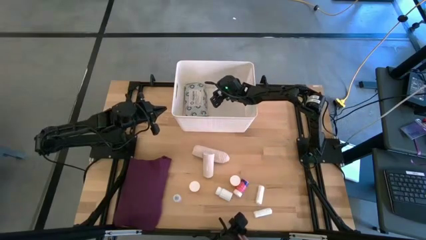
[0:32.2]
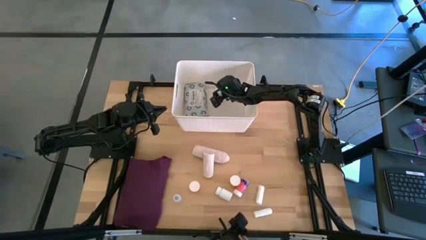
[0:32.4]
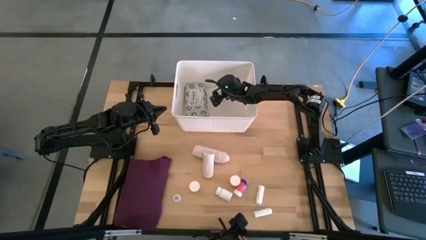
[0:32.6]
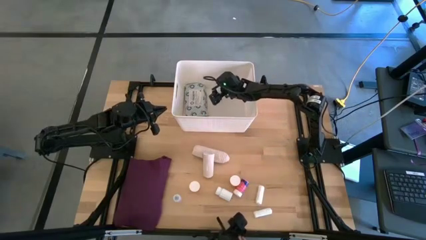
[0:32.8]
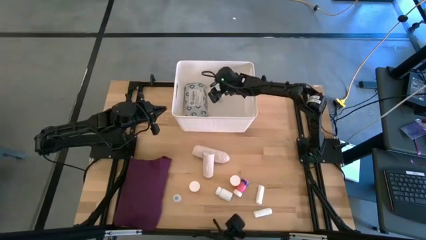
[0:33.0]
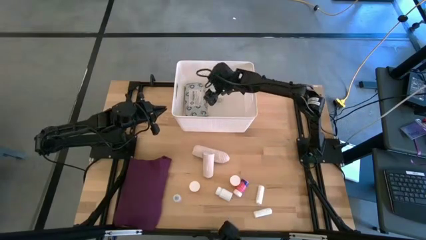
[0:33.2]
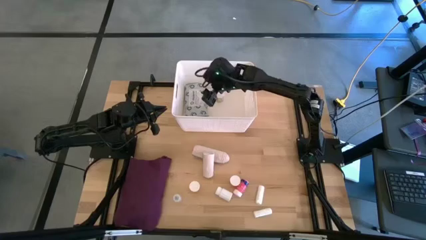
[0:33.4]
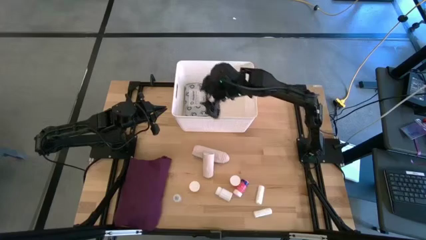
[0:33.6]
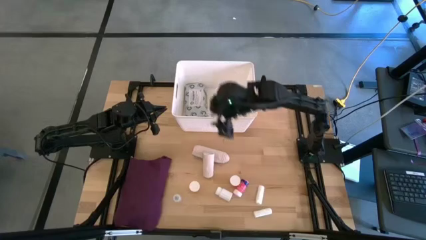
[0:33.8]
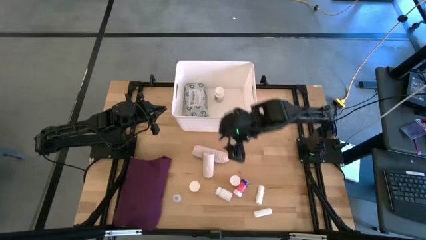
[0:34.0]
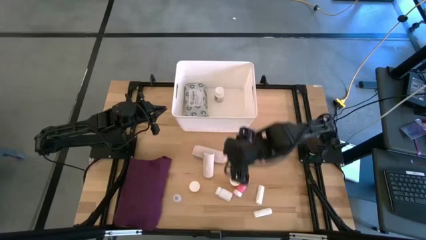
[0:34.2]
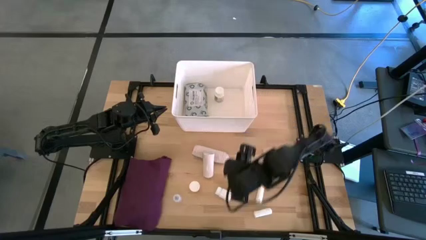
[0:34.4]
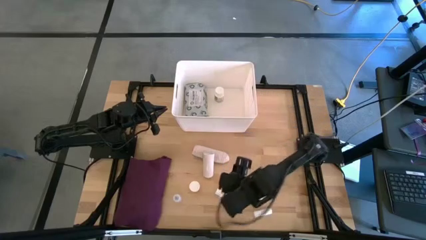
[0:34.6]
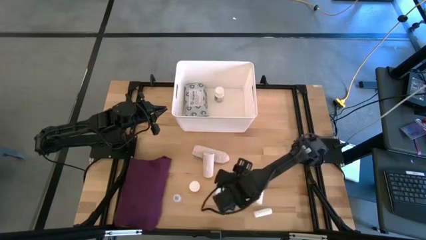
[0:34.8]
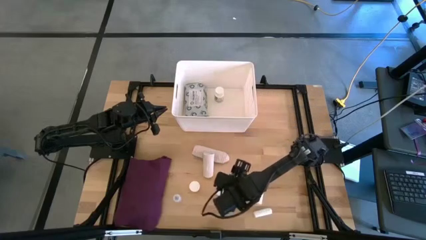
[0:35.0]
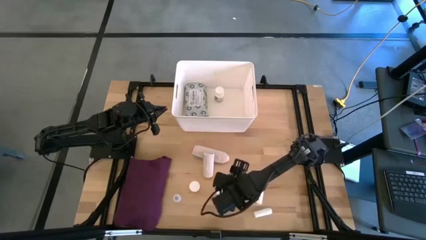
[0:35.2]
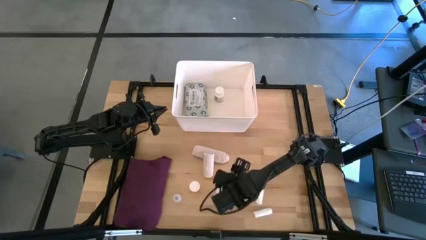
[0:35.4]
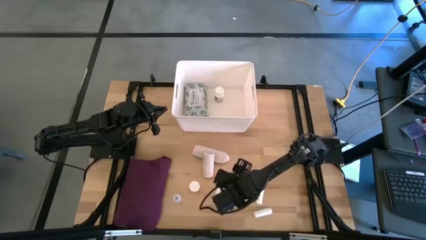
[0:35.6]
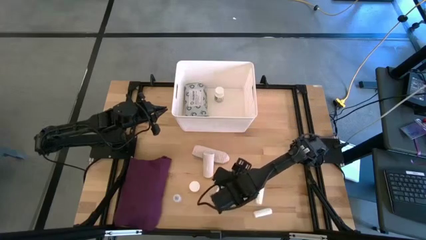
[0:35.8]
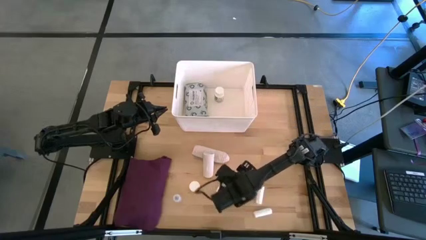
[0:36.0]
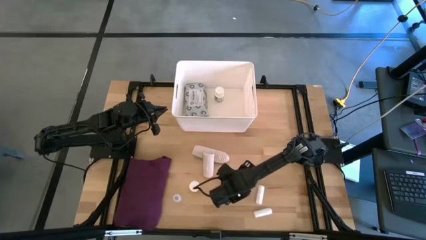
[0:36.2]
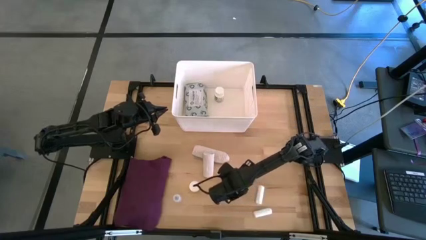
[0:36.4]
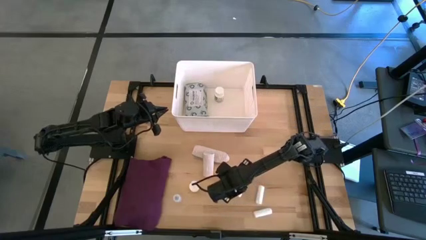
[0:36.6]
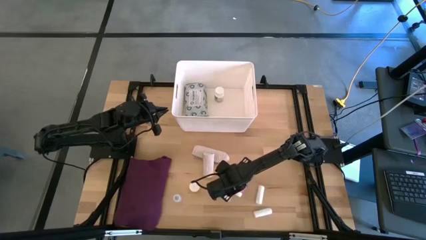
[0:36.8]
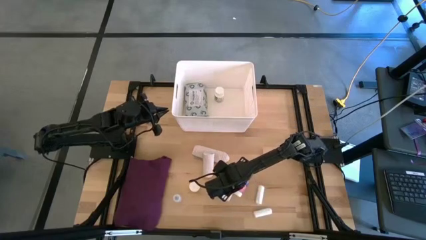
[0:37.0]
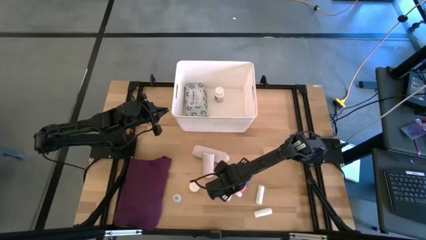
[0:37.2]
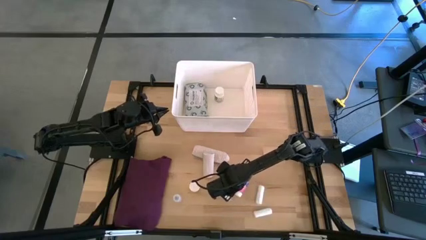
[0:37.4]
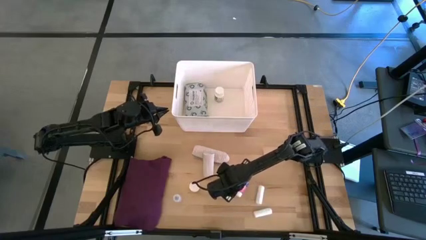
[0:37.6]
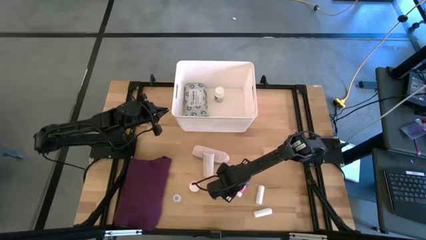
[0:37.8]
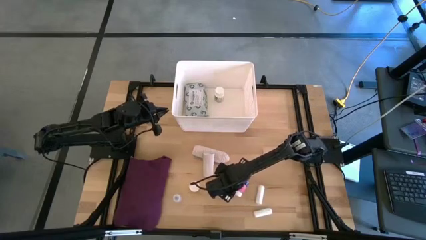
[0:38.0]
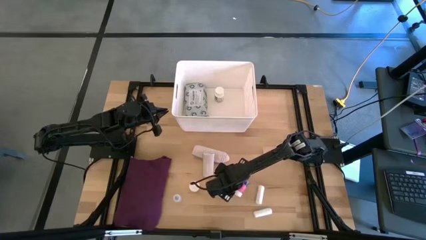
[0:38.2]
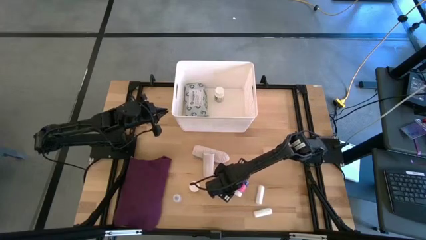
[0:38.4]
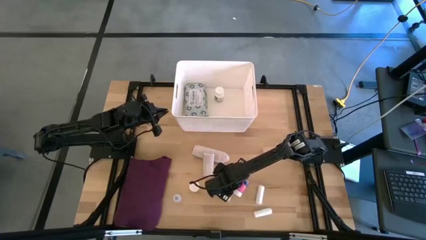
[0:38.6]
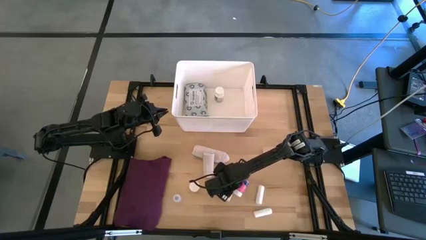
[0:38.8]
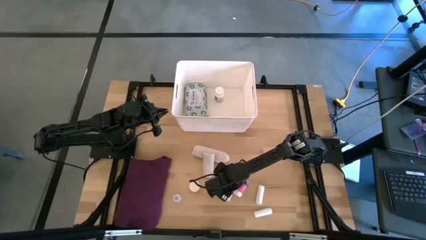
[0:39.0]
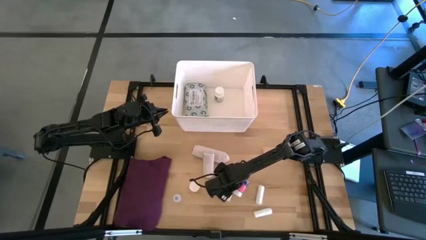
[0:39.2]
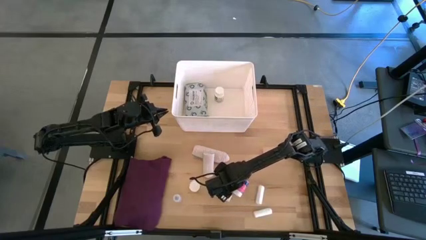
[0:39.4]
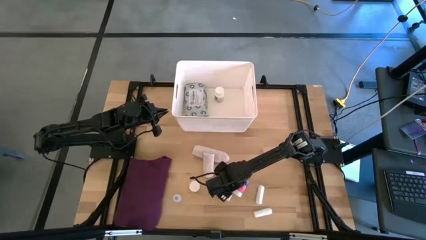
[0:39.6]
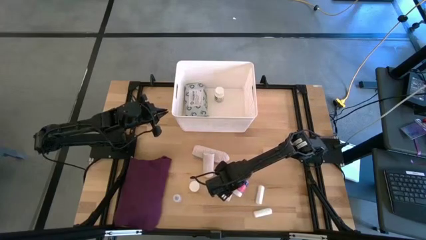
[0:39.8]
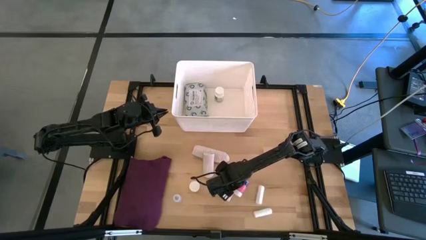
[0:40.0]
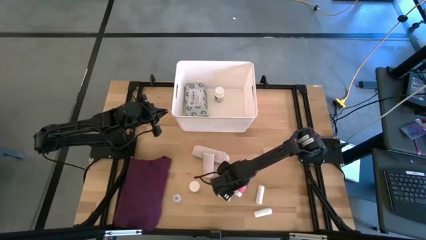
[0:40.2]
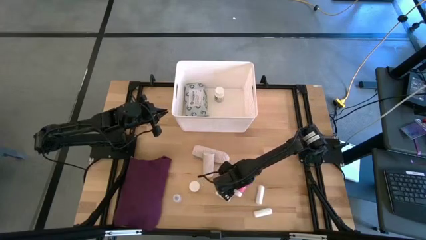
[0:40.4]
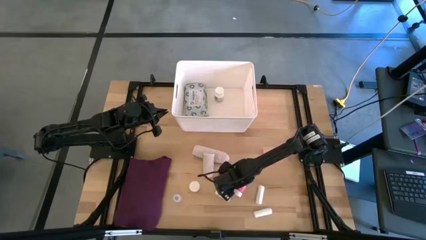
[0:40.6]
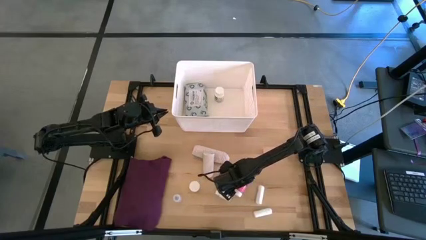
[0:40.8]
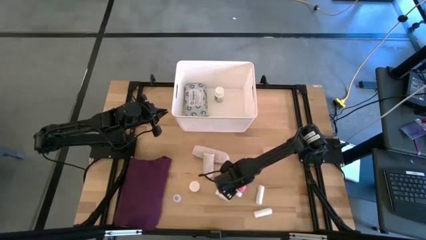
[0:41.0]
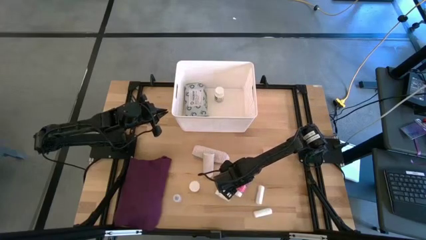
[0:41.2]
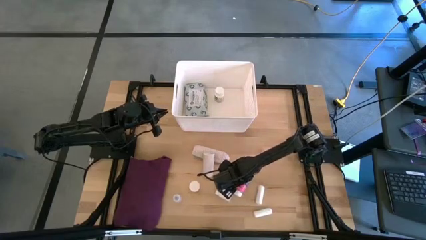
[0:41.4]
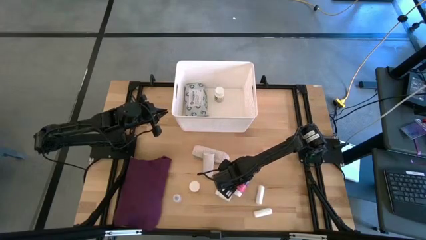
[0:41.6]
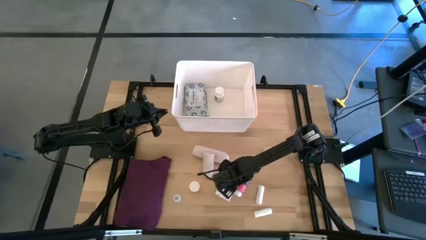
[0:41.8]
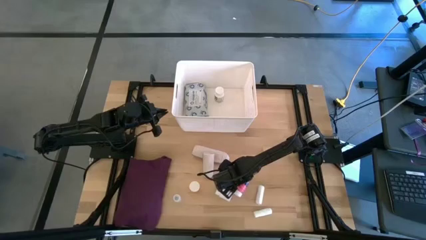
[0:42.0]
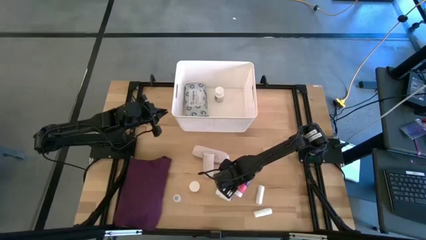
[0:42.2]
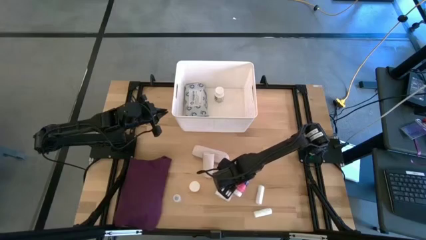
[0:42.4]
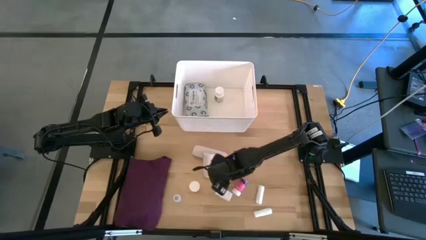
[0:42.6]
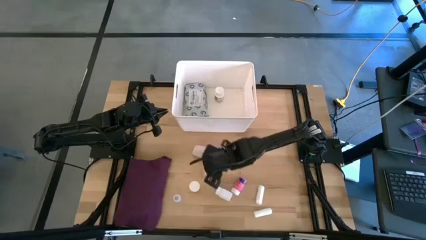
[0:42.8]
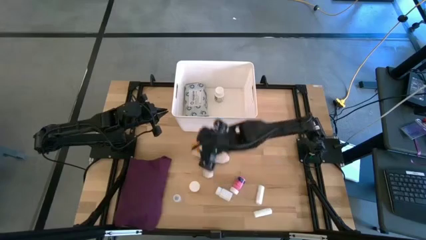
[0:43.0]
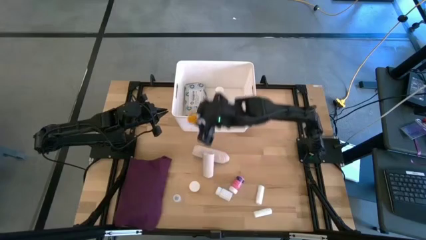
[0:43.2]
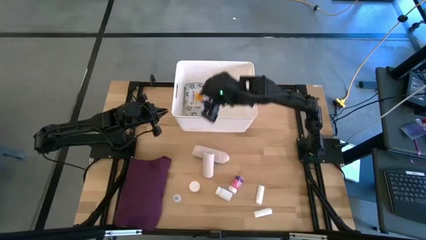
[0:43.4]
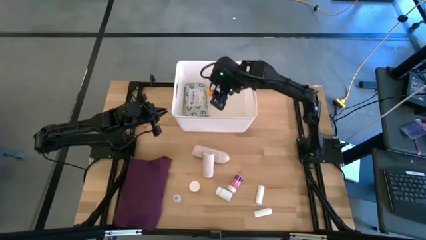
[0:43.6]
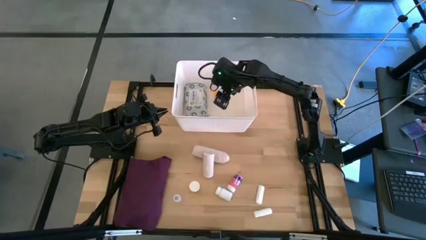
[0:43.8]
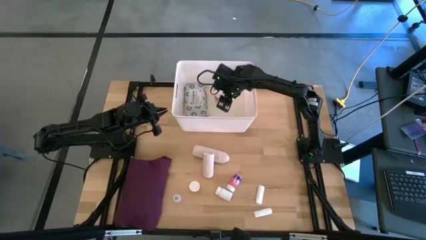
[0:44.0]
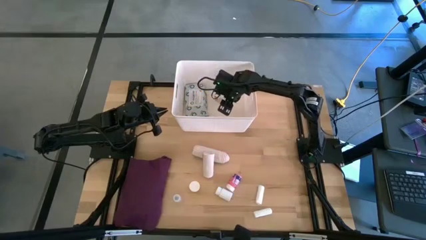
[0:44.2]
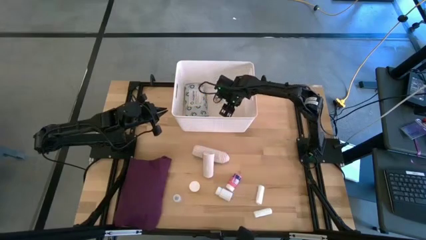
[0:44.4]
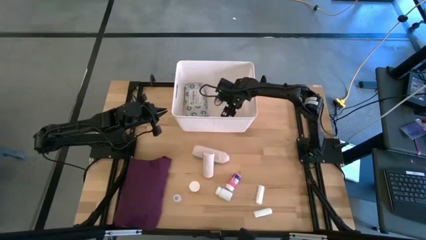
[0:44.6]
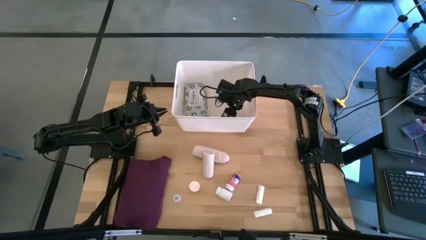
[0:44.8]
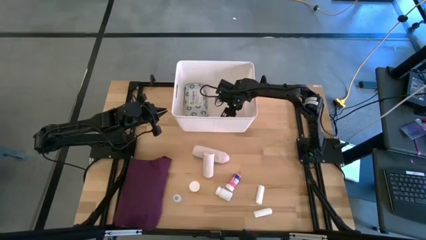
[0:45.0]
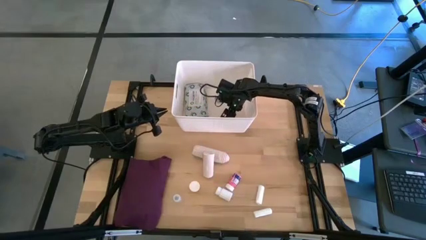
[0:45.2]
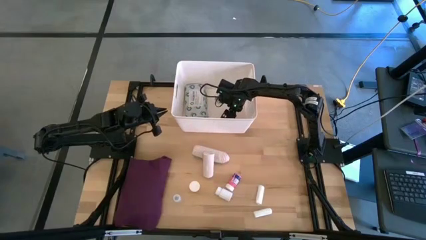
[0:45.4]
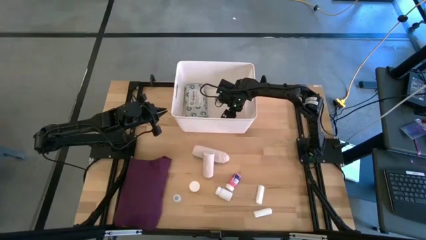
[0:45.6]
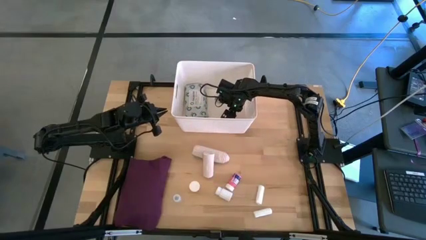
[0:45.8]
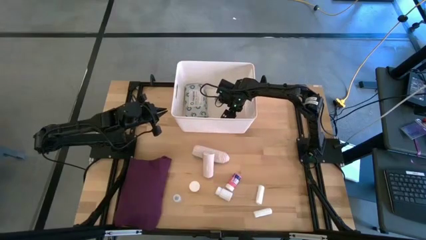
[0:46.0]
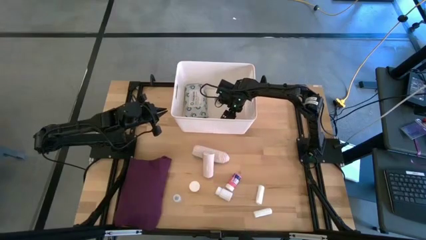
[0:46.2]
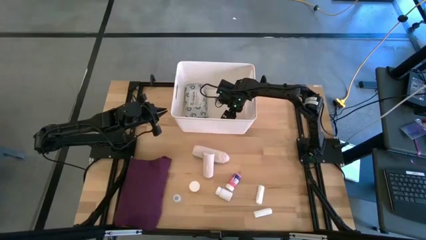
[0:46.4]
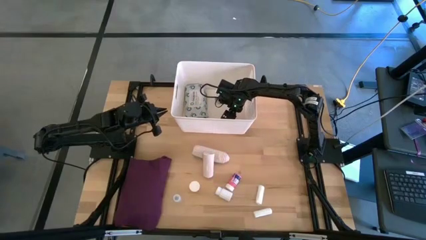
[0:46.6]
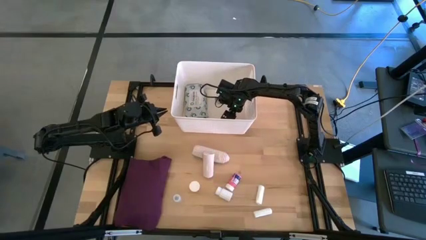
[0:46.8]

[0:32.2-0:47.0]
Task: Pick & place medical supplies in basket/bin
Put the right yellow pill bottle into the white bin
